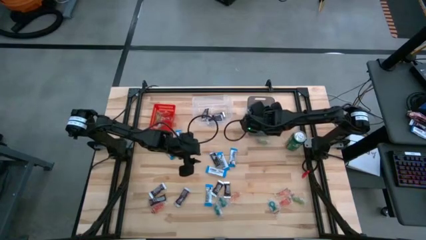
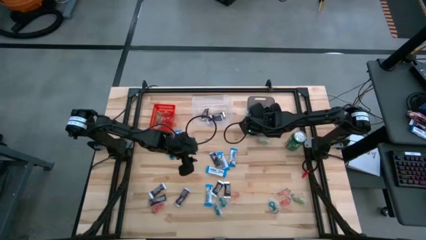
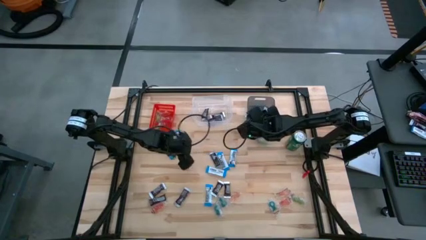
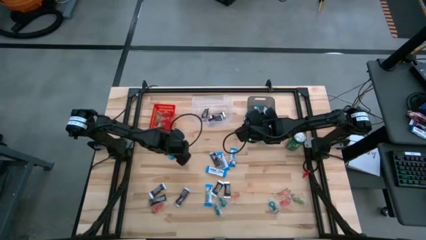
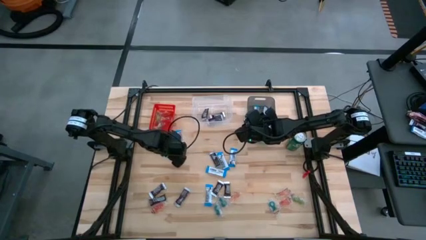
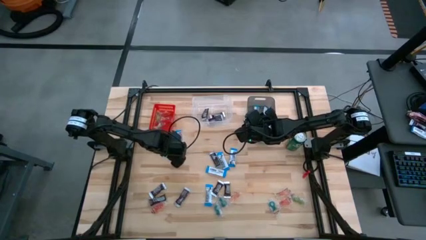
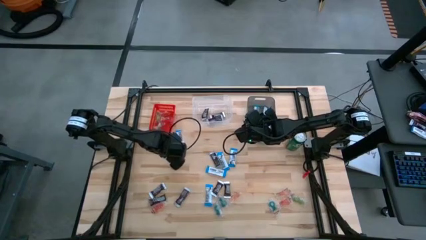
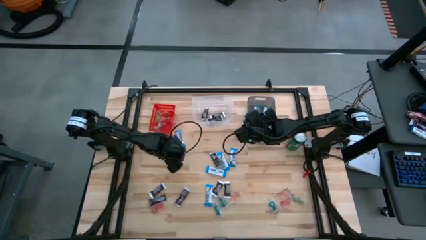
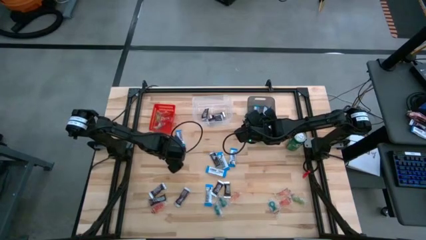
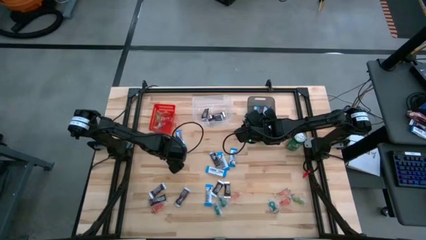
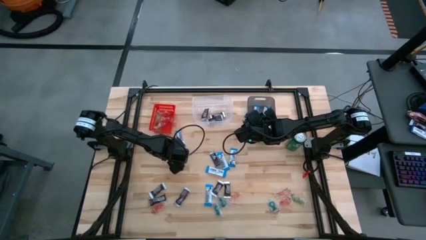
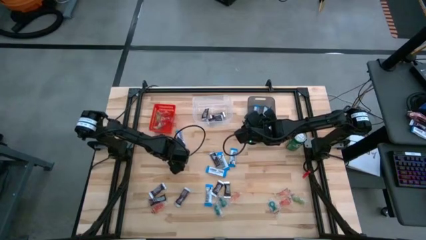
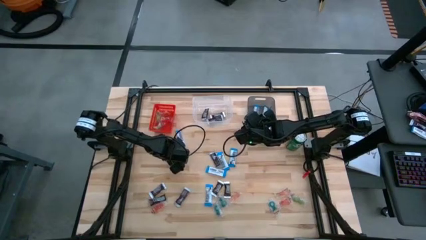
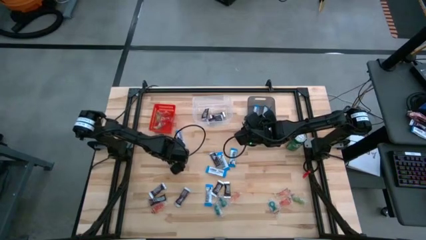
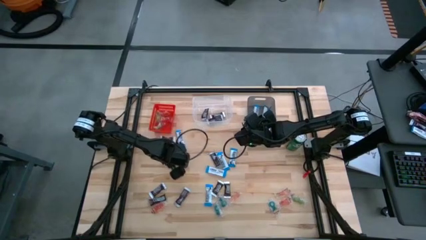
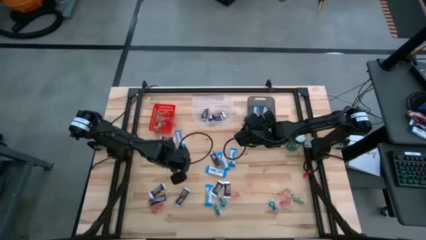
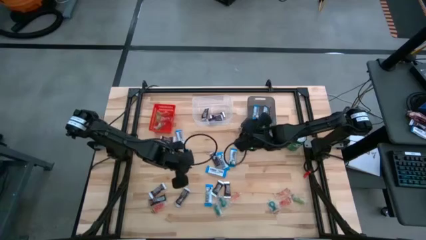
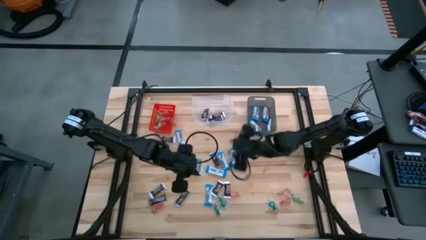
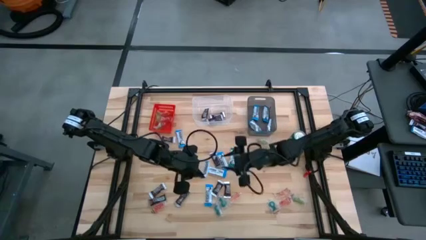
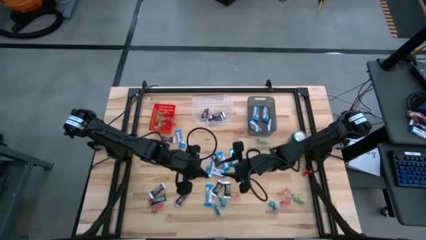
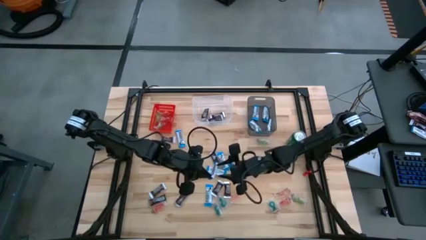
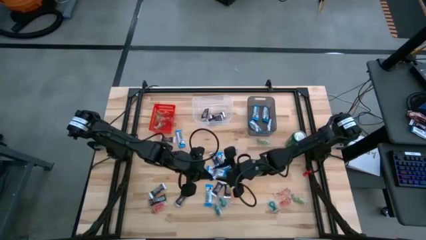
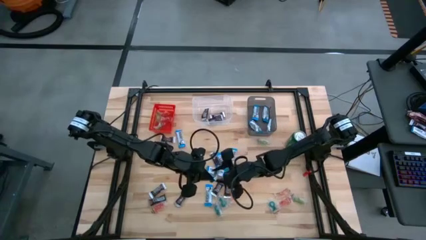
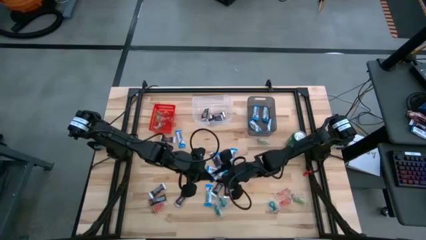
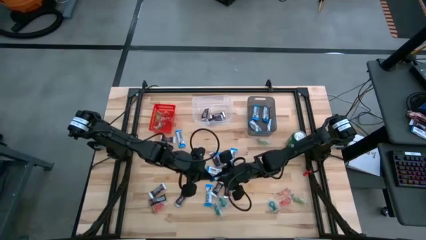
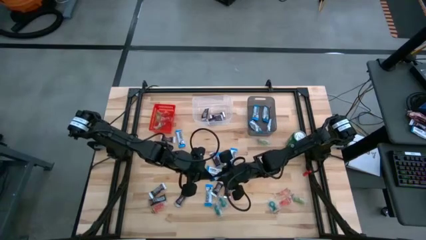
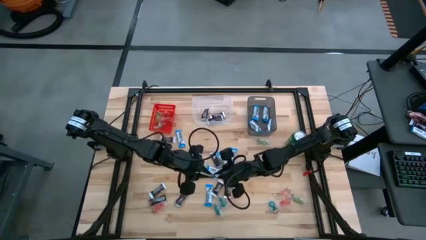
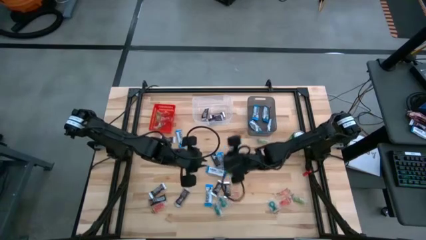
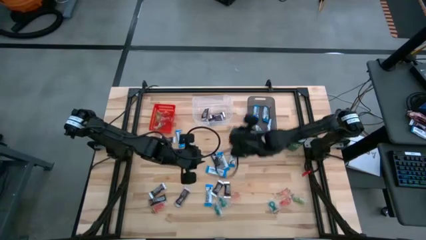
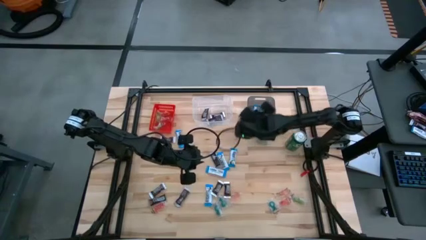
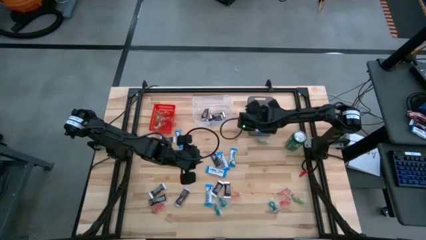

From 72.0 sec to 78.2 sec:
Task: Sort candy
Put the white chocolate bar into the black bin

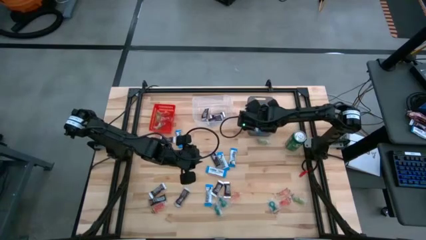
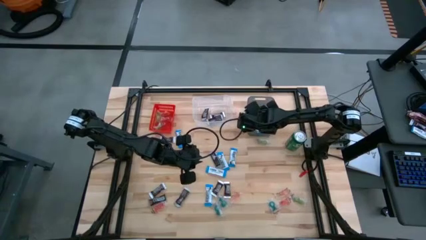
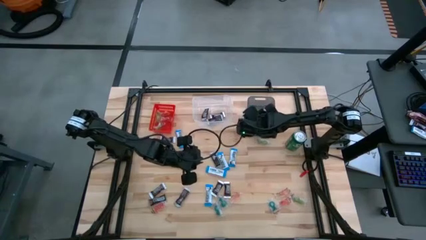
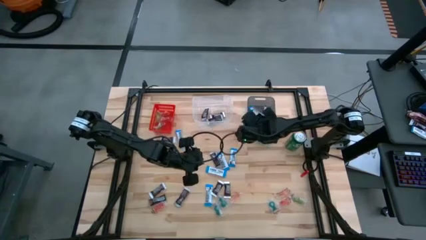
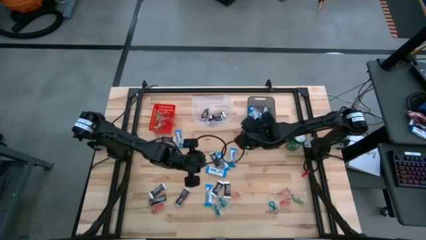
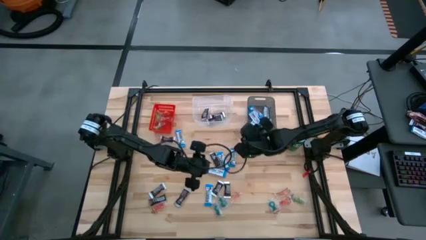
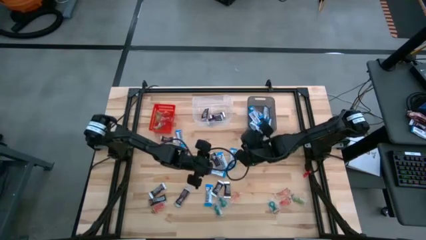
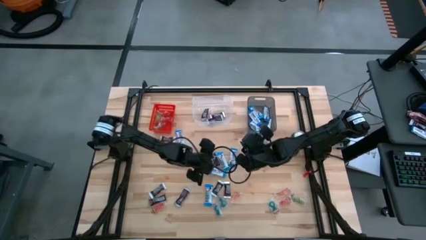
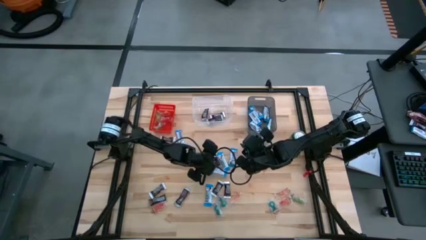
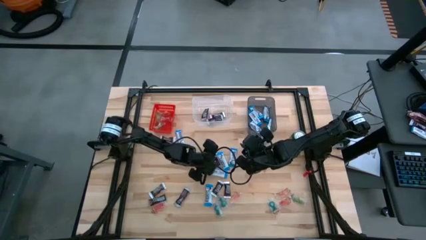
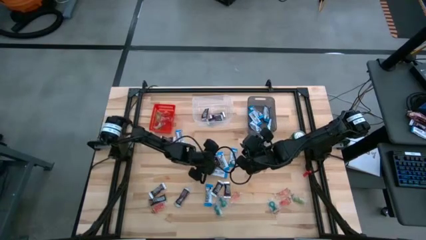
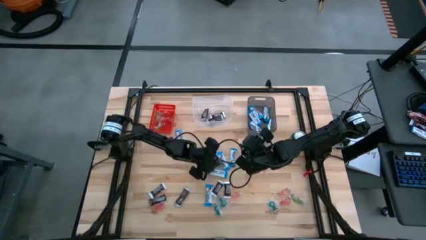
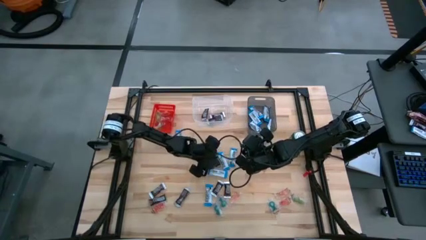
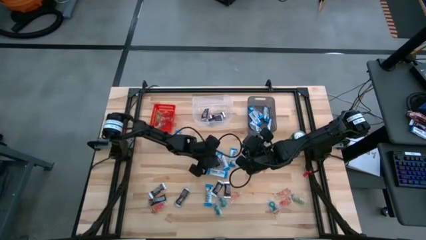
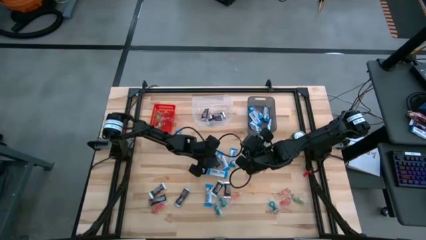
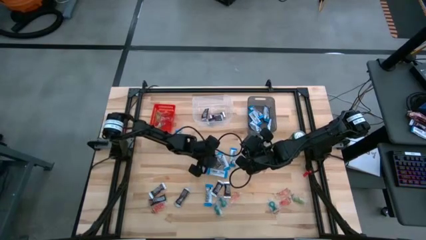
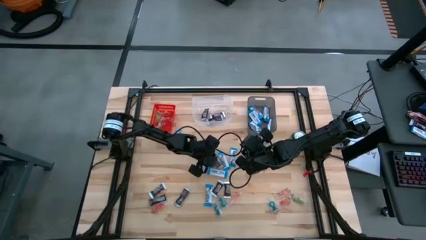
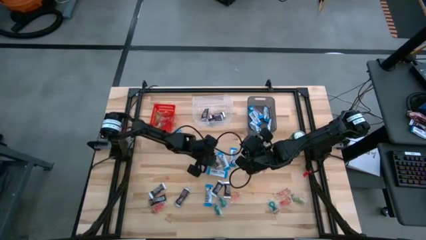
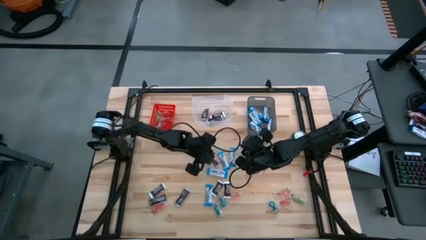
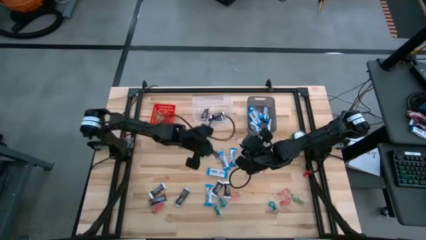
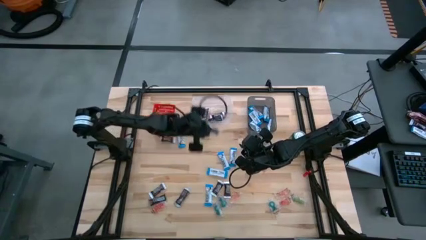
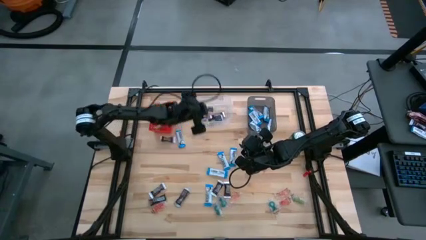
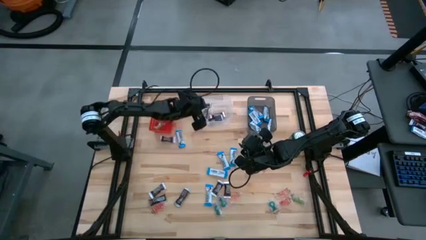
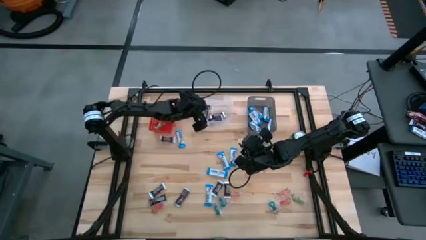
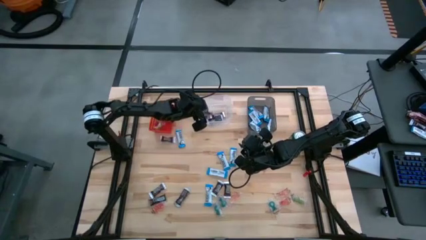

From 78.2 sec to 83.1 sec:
Put the black chocolate bar into the transparent bin

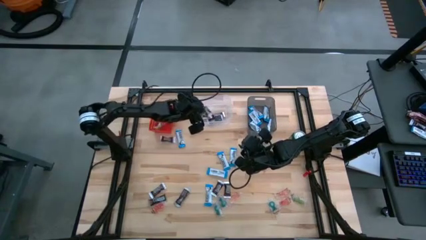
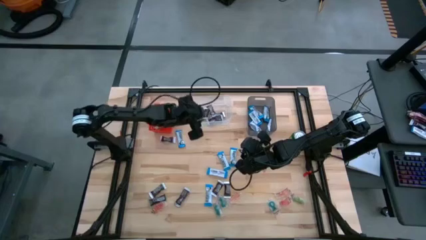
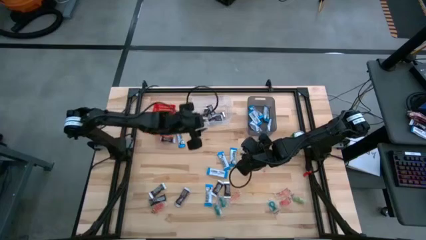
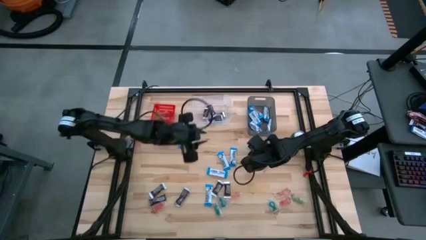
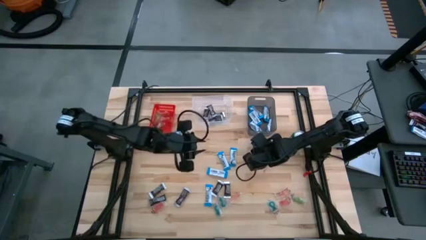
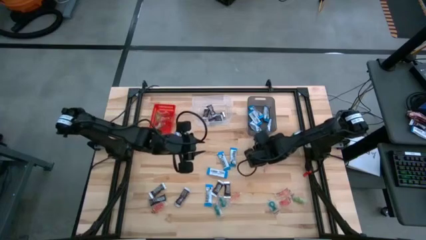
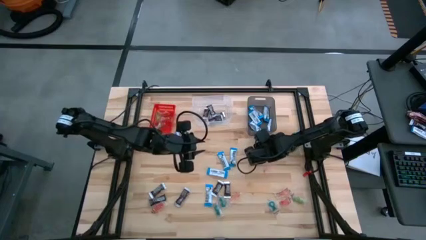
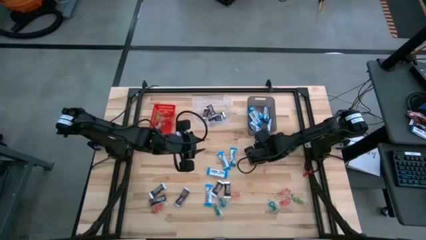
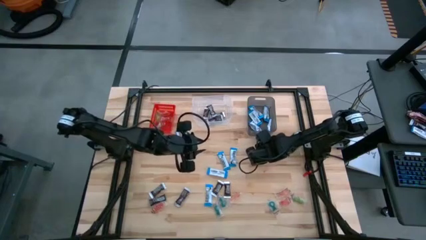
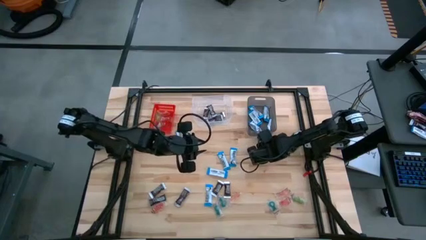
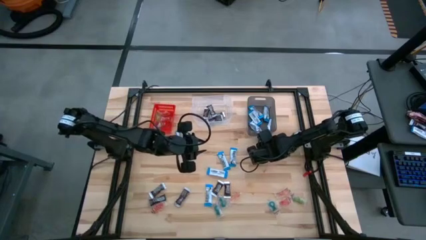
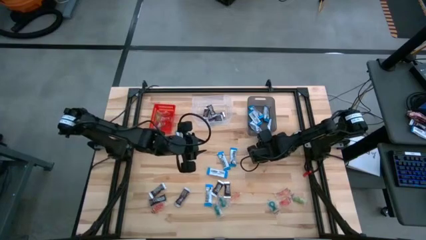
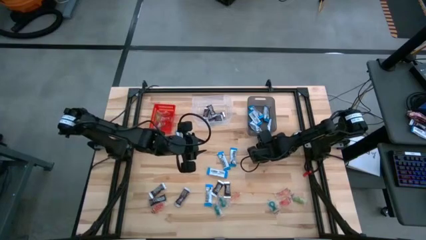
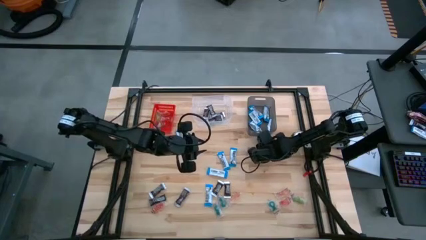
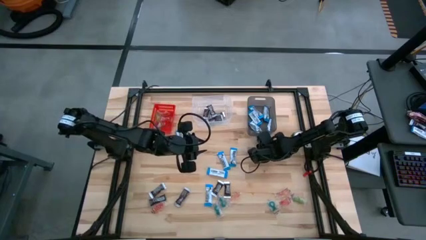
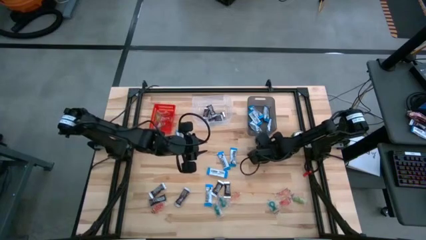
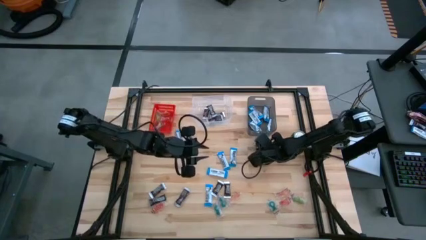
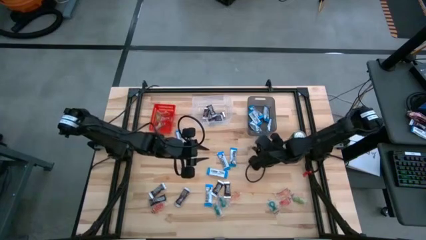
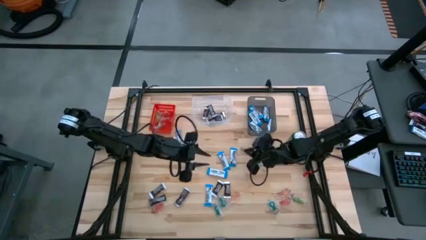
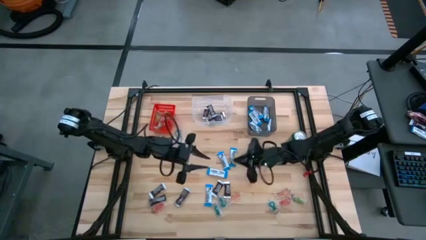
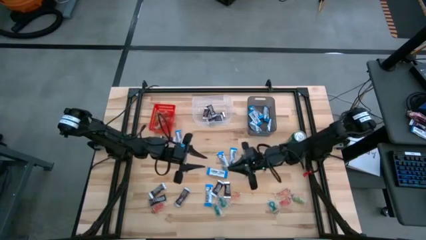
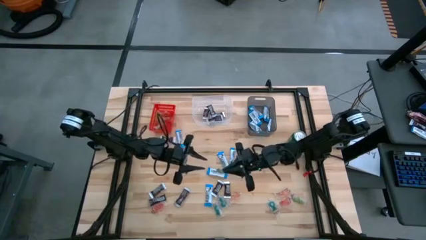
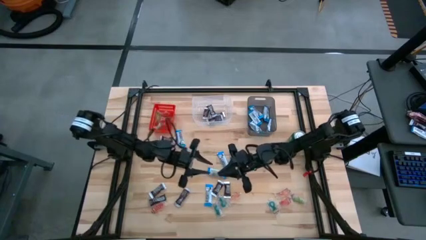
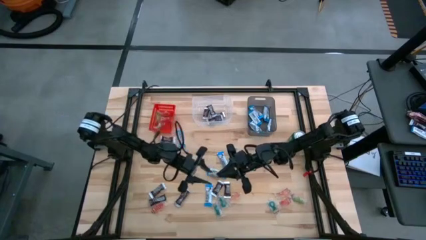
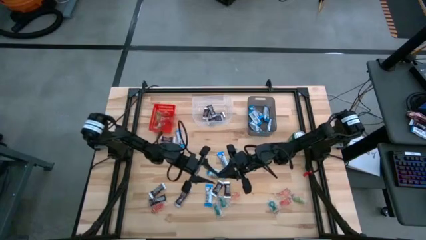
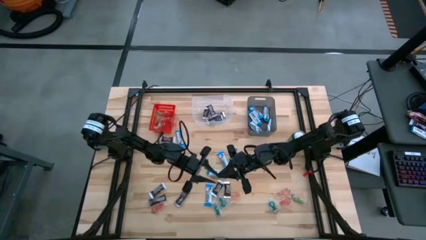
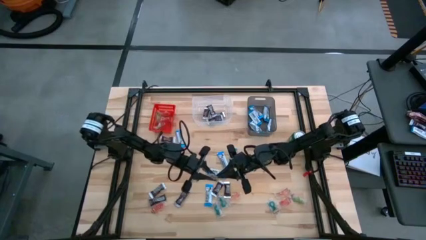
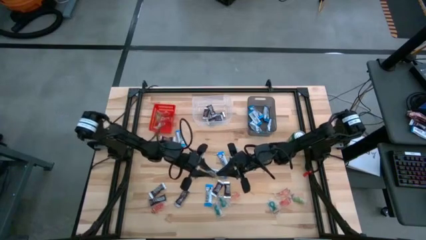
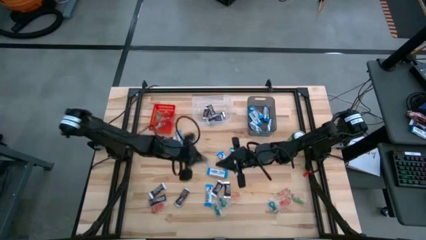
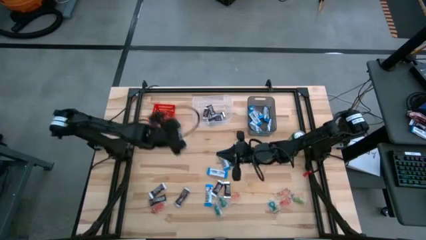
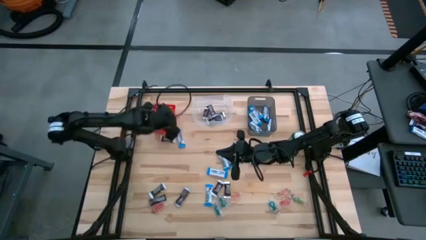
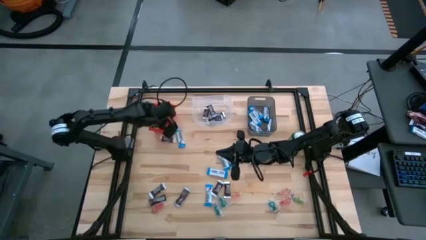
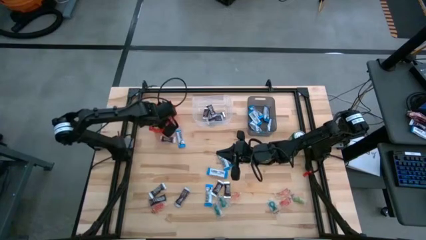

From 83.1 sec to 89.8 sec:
Put the green candy into the red bin
